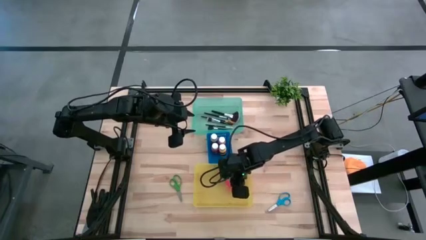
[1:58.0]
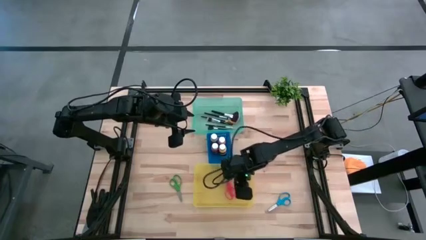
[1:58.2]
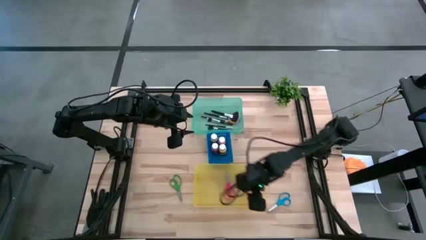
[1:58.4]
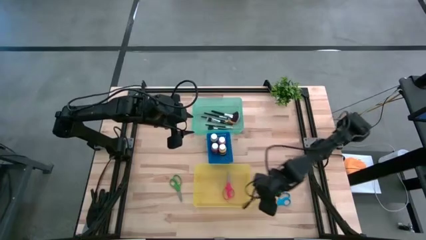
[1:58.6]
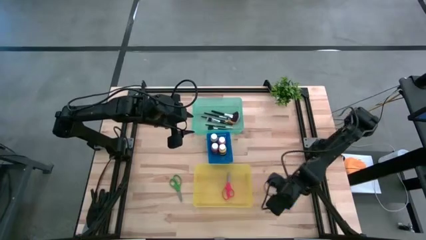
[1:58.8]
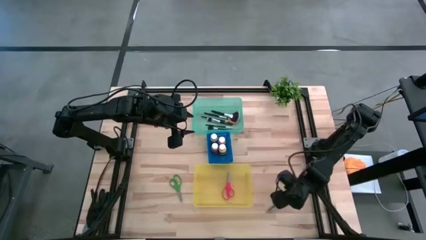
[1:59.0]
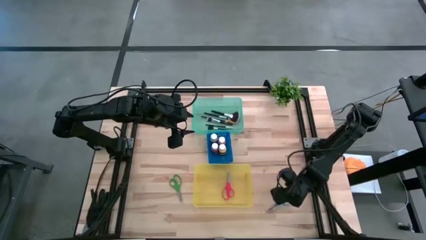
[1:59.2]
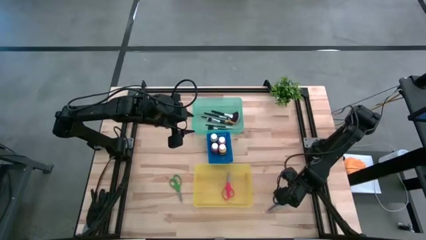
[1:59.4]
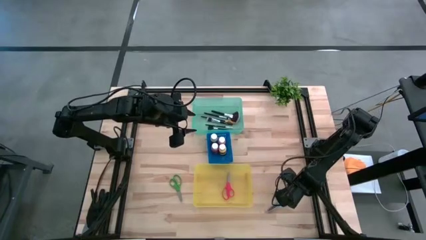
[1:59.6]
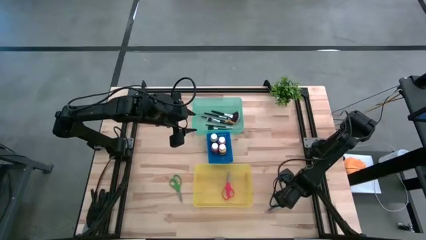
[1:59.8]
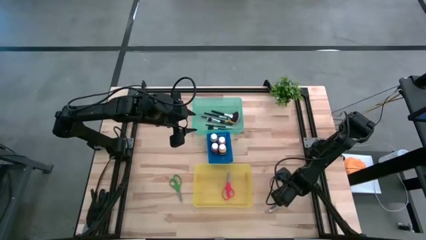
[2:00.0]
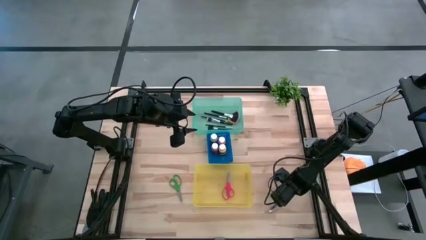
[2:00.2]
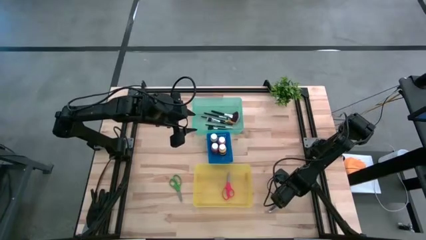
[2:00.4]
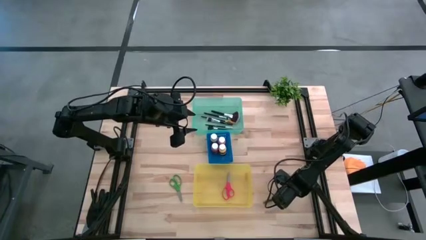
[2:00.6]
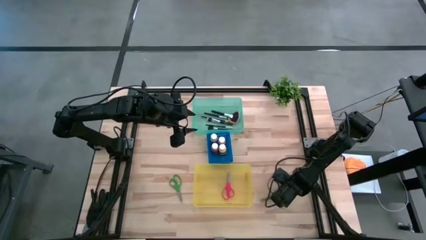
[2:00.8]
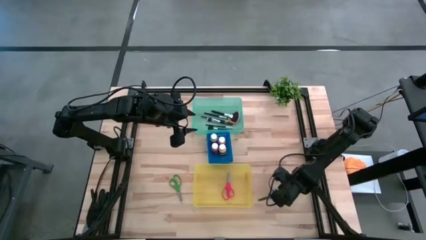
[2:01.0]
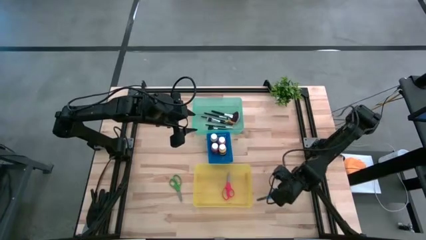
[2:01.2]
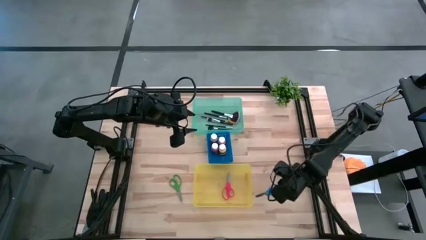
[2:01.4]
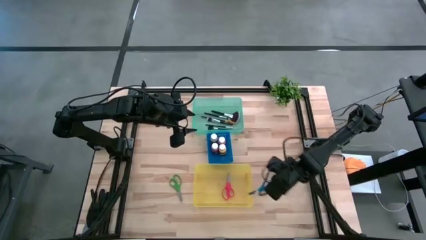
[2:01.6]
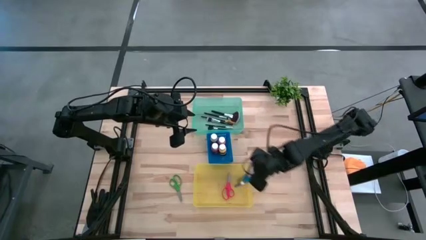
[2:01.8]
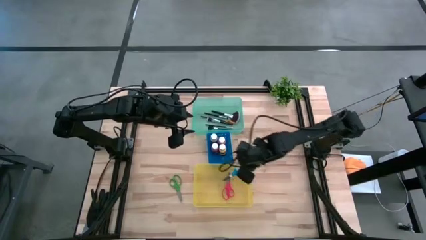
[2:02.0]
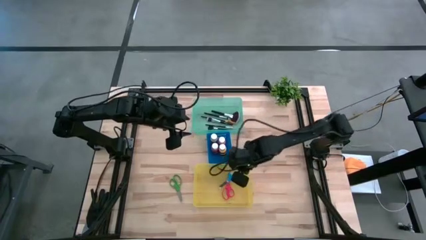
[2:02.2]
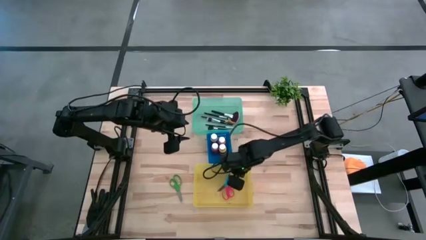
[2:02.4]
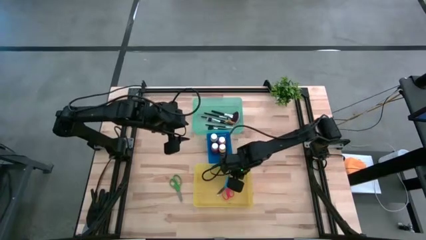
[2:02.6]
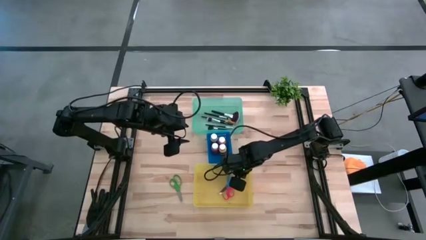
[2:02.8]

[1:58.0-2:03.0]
Task: Pick & Place Paint Supplies
Put the blue scissors into the yellow bin

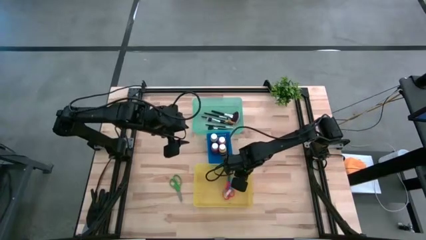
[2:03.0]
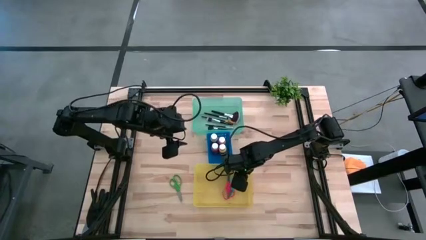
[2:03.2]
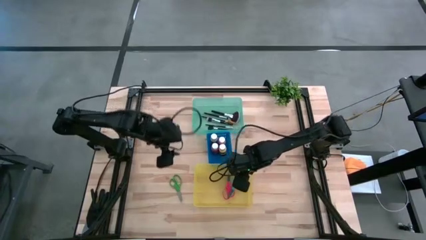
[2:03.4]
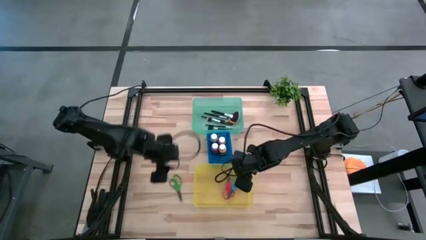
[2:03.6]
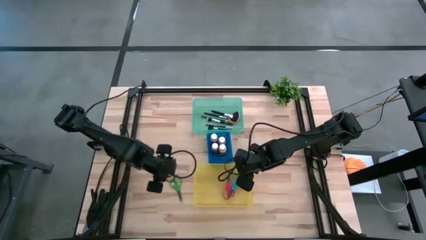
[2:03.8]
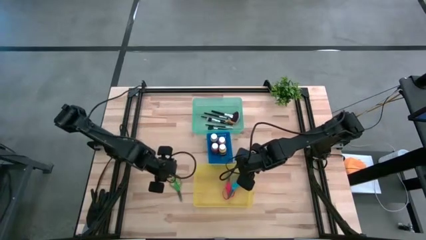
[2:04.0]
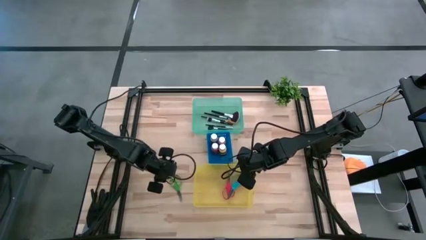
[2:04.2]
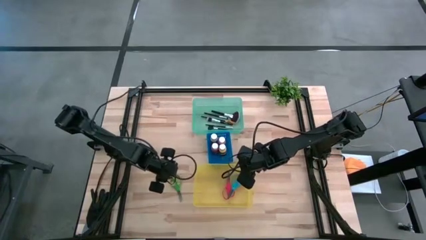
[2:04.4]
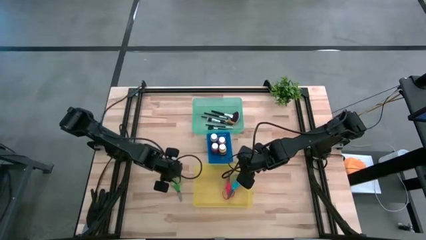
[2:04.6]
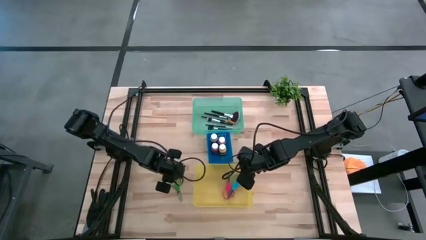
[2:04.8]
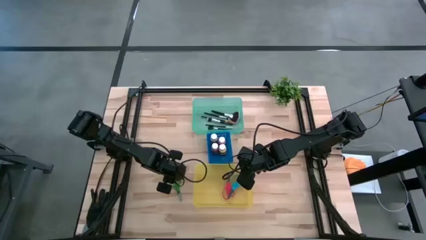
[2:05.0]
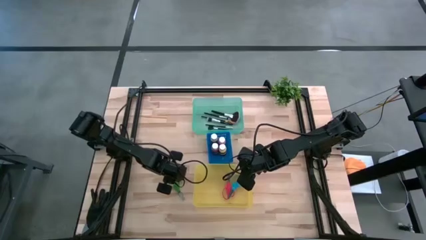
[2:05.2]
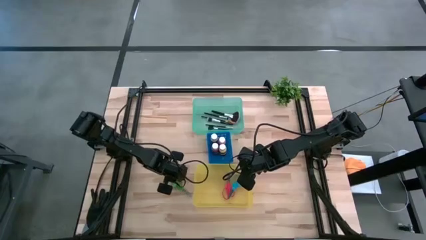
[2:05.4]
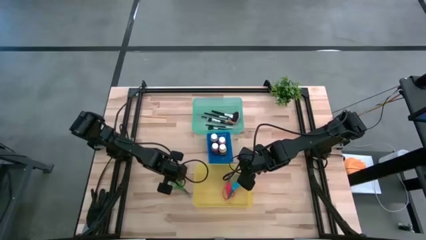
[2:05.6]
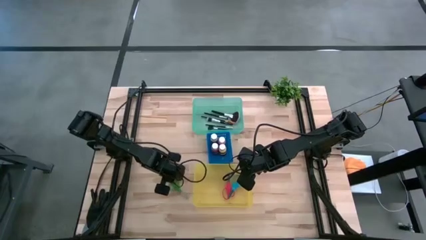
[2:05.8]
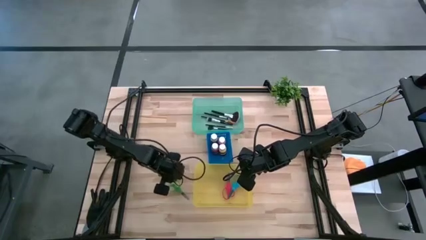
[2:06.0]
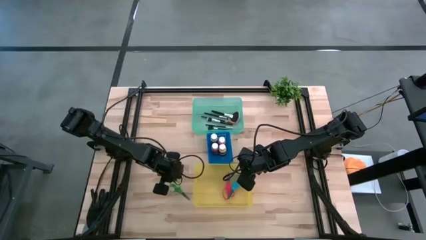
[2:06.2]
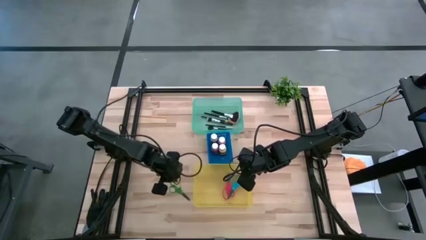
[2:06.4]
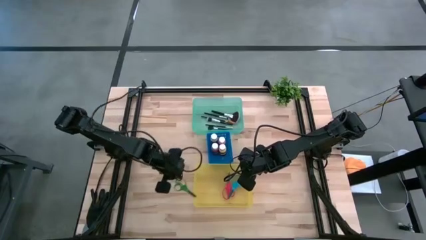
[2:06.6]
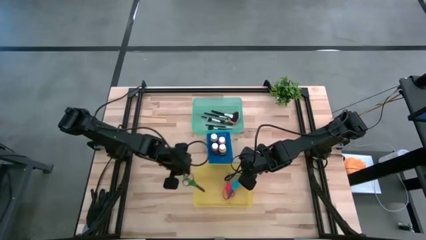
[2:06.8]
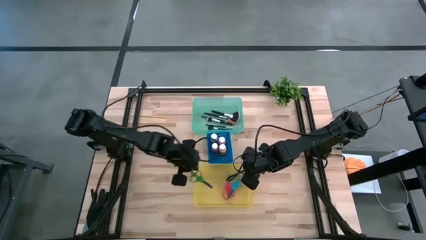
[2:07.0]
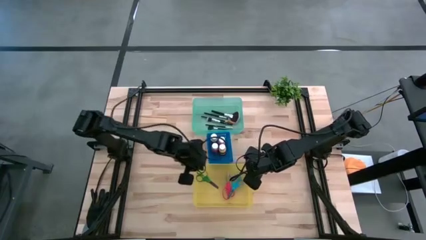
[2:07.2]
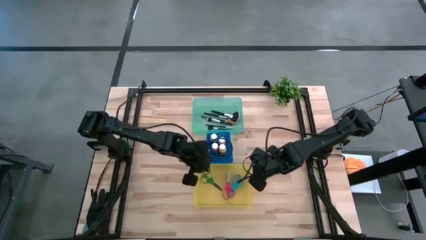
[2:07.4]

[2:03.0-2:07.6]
Put the green scissors into the yellow bin

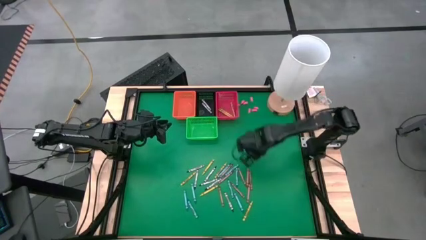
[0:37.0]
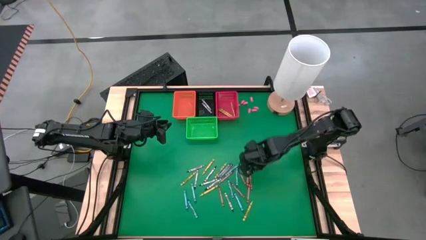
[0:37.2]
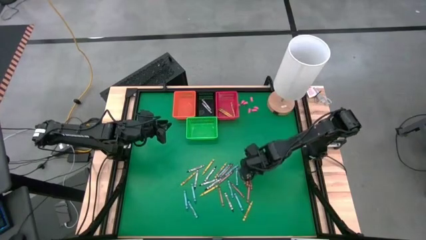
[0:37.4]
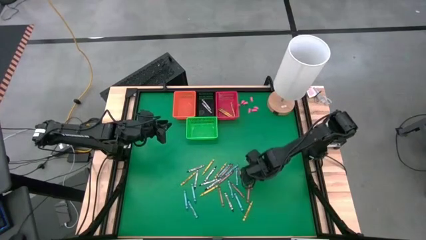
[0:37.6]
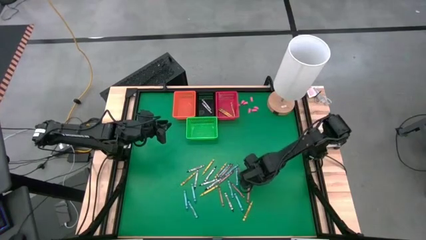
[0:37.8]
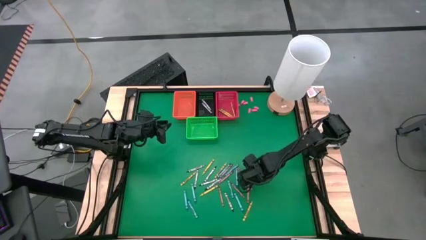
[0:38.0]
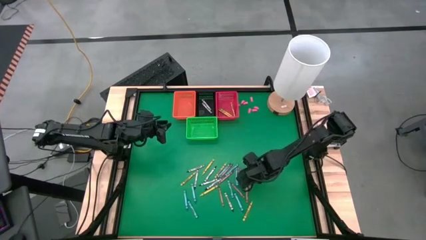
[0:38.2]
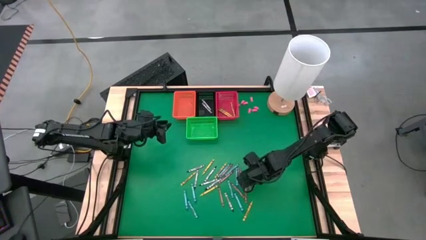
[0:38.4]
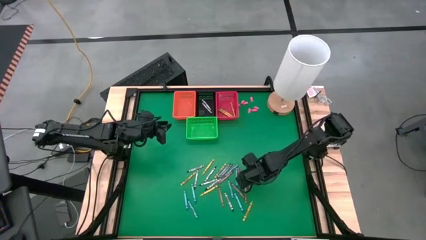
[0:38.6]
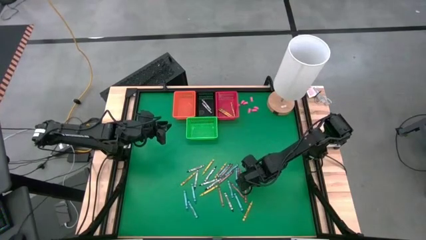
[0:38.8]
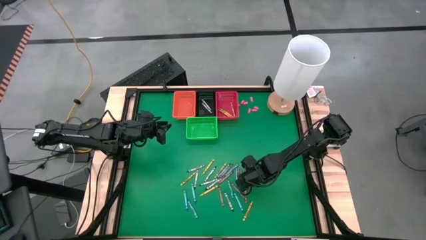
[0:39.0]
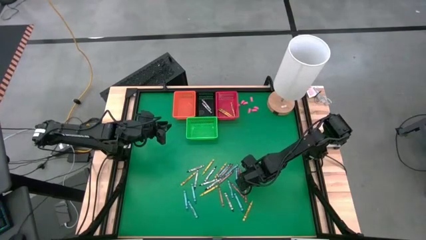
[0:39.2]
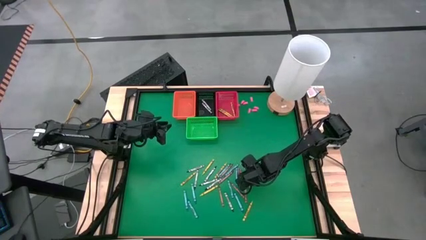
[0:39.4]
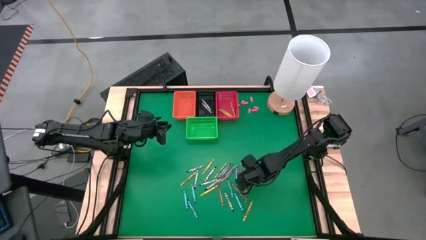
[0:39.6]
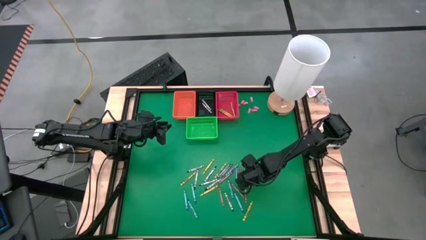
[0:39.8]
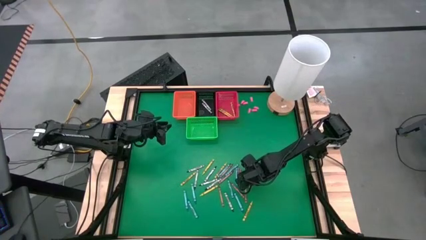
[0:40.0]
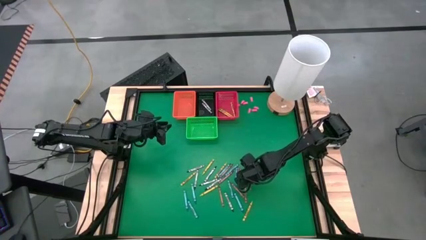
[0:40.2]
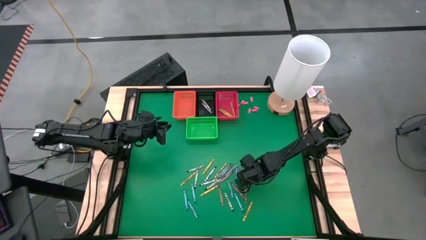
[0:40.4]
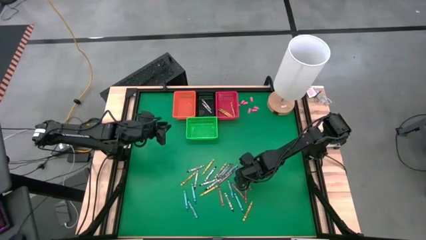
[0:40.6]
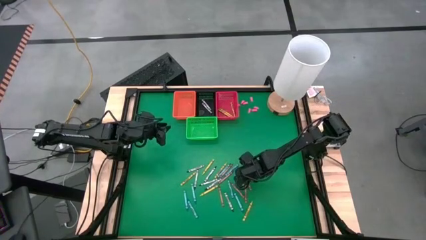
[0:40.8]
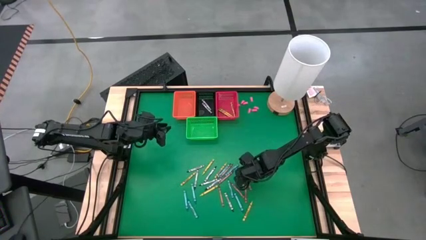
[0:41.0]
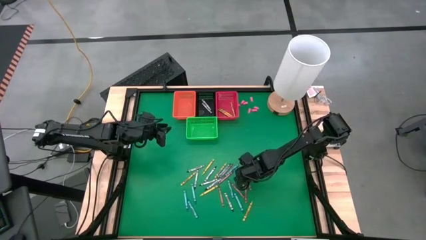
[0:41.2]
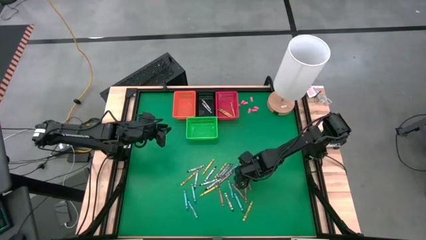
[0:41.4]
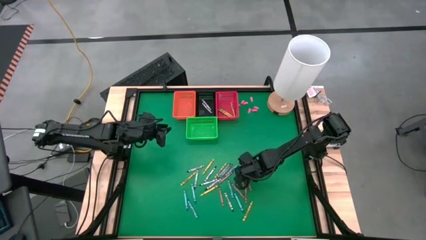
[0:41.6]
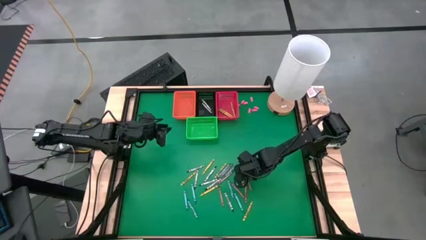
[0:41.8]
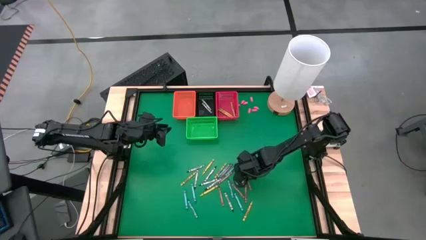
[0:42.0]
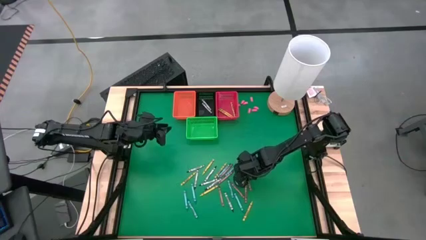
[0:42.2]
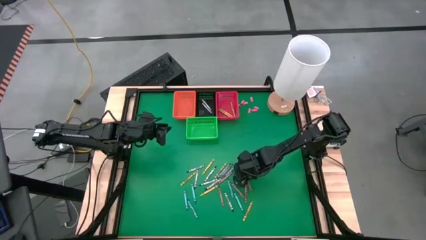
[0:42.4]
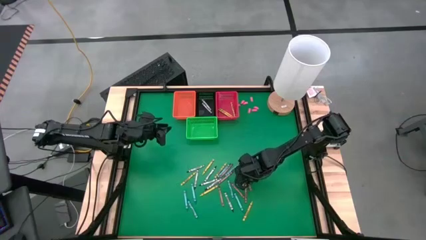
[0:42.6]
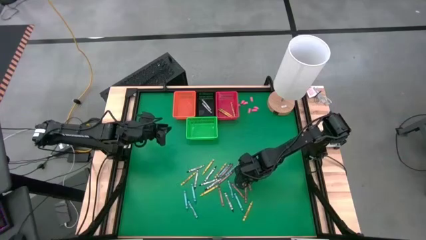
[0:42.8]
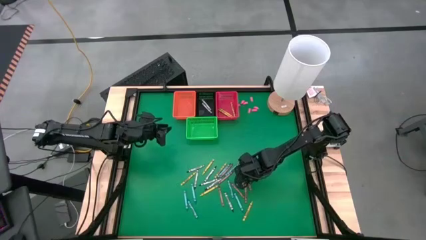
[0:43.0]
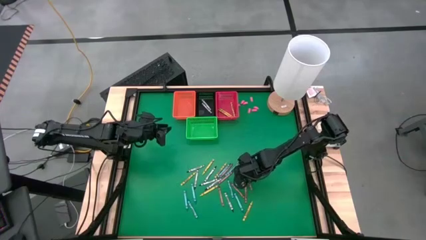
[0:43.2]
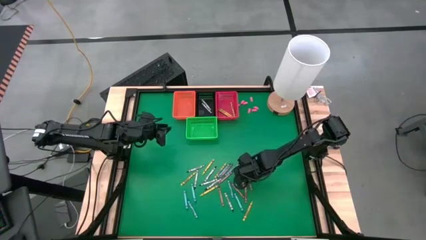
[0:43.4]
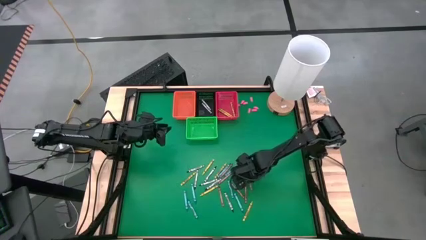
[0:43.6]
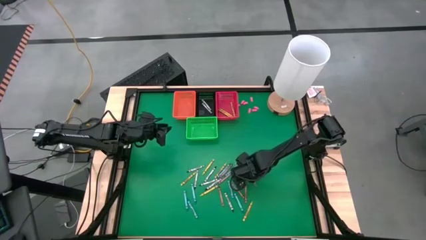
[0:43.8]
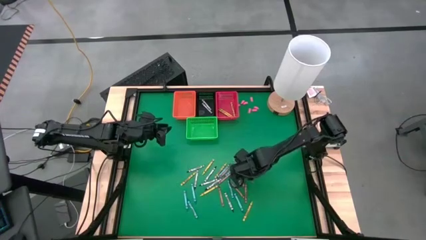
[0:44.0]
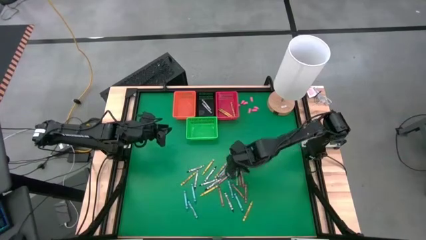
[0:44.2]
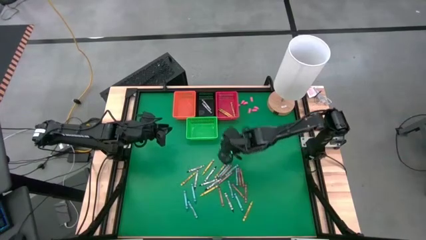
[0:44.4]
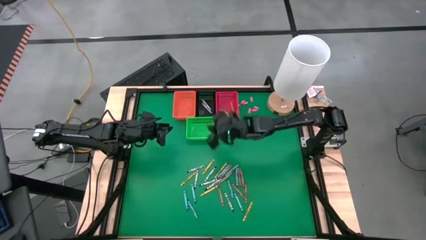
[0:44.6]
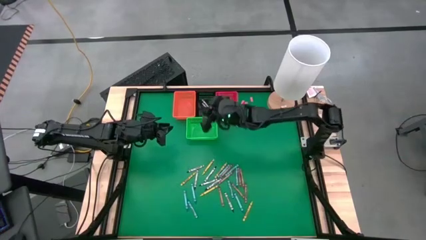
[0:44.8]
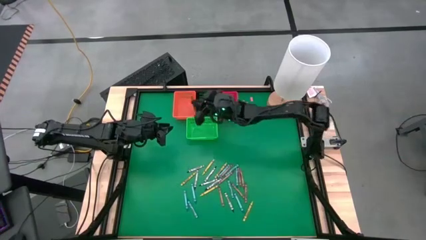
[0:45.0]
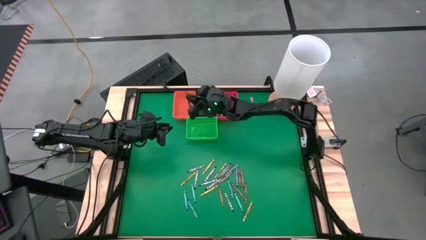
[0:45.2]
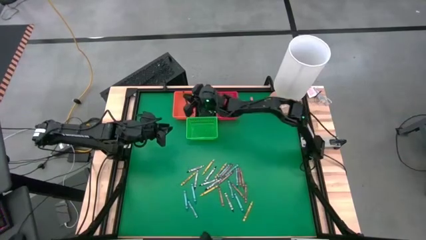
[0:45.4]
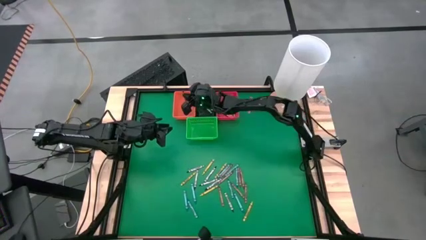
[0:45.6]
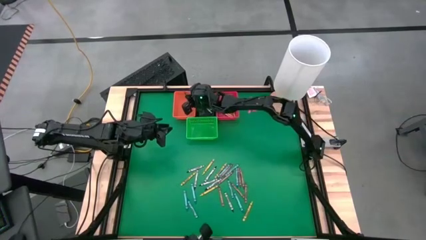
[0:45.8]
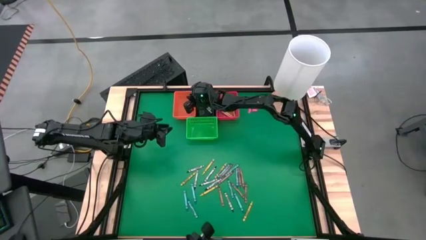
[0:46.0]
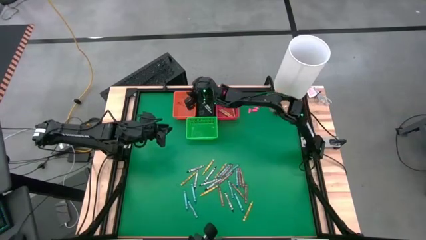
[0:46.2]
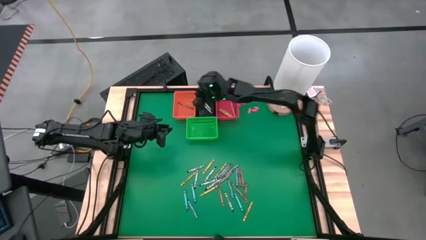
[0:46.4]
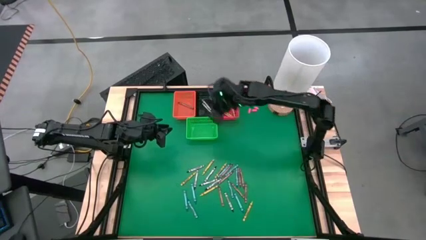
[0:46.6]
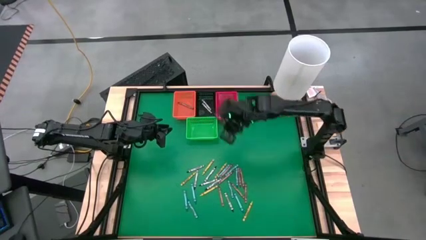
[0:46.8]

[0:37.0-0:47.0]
Task: Sort crayons
Put a red crayon in the orange basket
